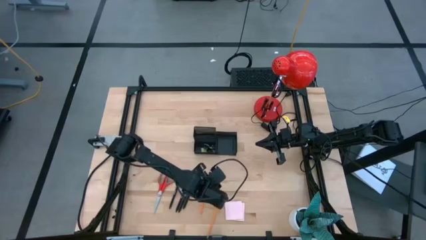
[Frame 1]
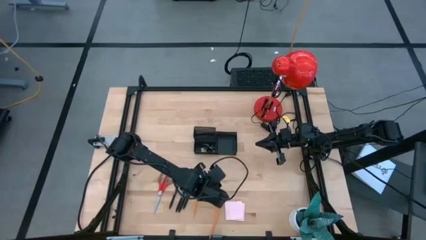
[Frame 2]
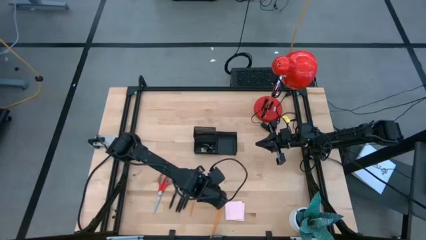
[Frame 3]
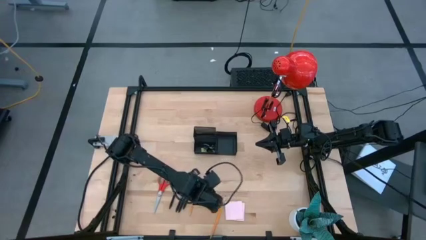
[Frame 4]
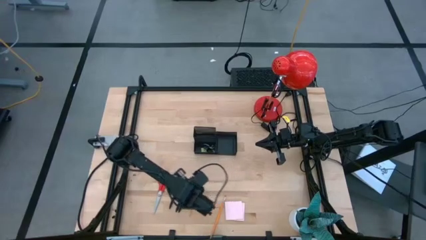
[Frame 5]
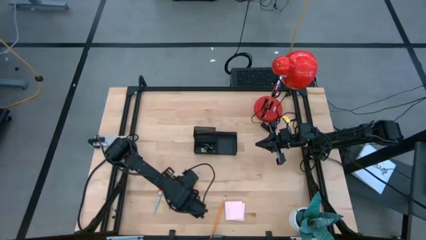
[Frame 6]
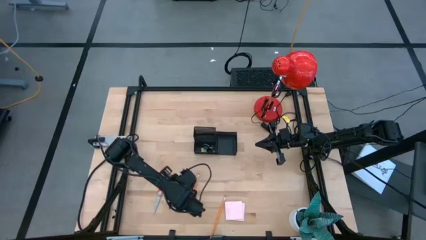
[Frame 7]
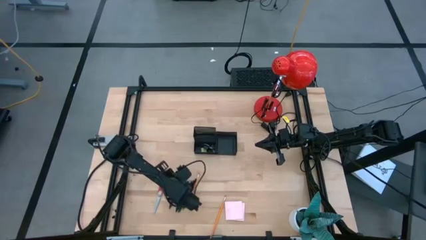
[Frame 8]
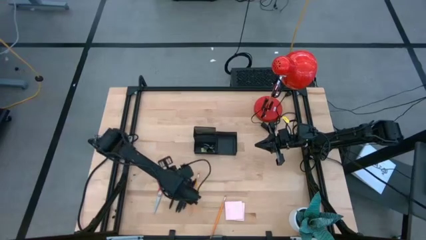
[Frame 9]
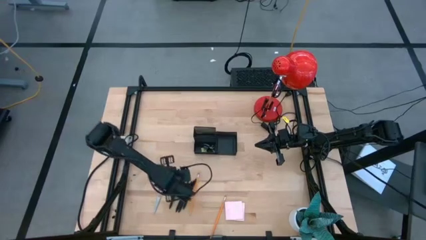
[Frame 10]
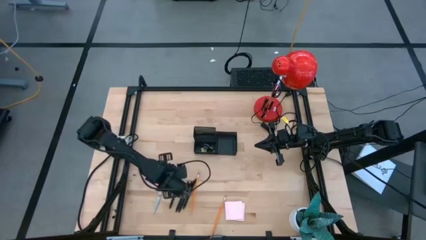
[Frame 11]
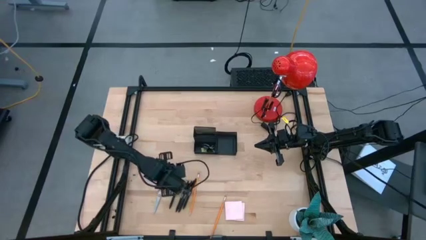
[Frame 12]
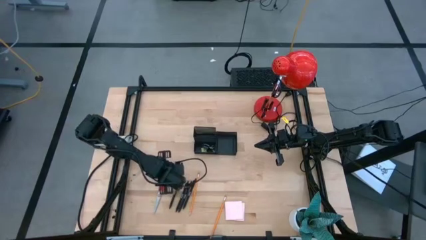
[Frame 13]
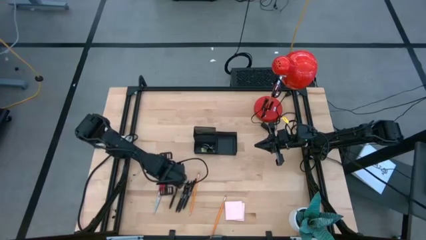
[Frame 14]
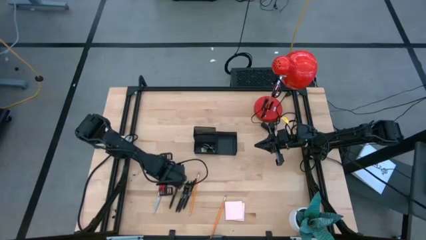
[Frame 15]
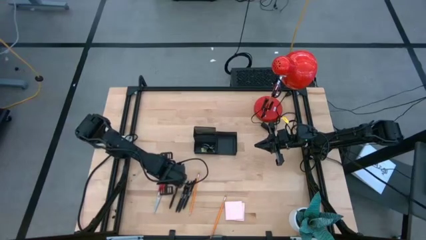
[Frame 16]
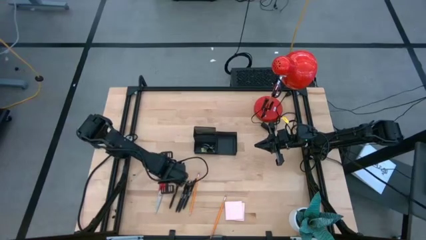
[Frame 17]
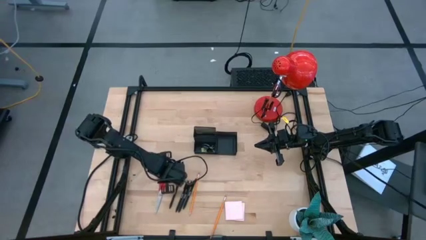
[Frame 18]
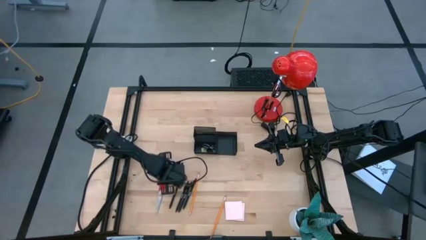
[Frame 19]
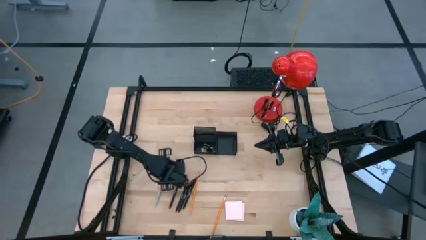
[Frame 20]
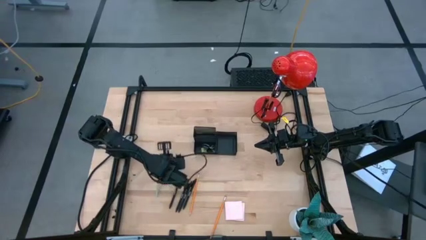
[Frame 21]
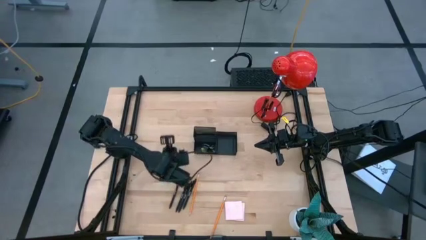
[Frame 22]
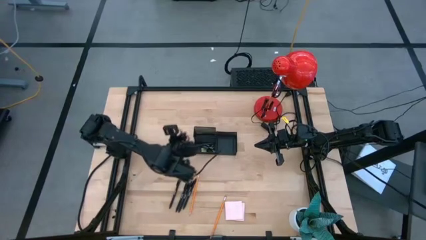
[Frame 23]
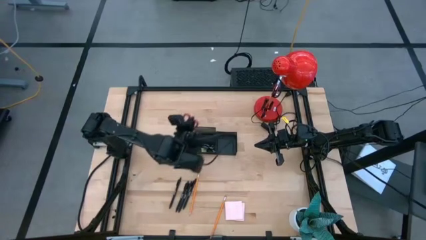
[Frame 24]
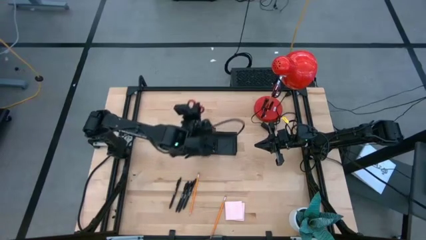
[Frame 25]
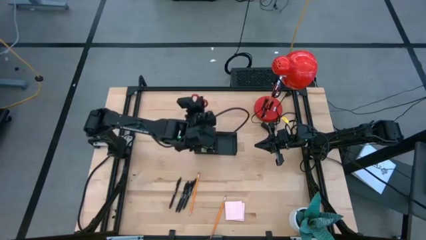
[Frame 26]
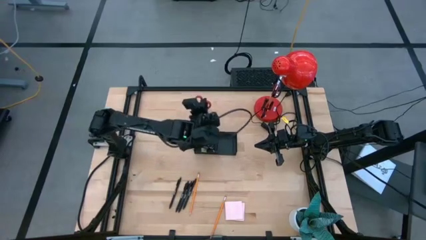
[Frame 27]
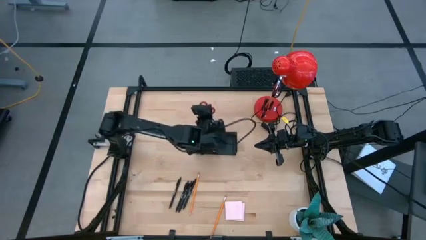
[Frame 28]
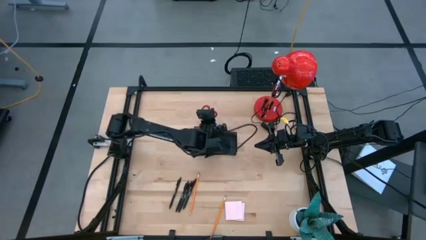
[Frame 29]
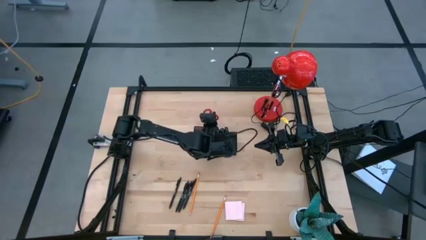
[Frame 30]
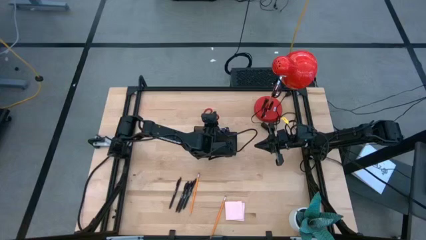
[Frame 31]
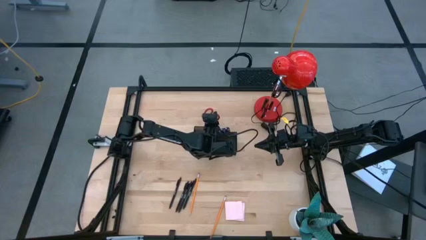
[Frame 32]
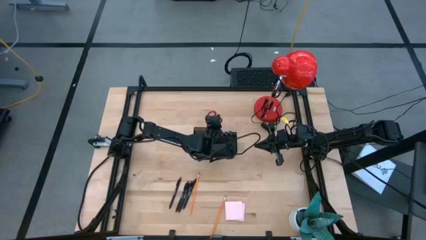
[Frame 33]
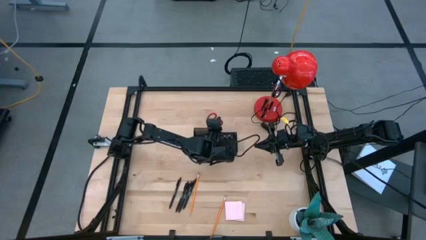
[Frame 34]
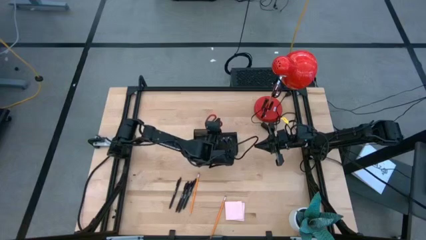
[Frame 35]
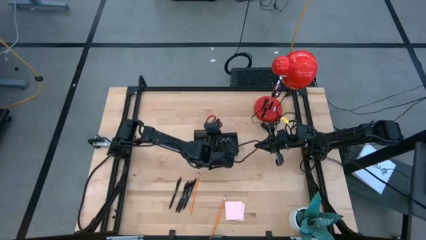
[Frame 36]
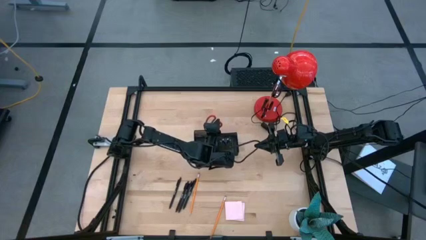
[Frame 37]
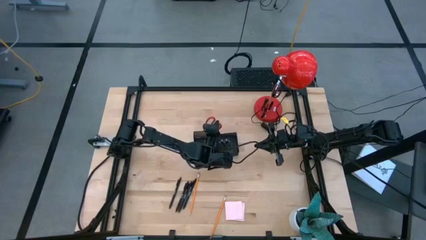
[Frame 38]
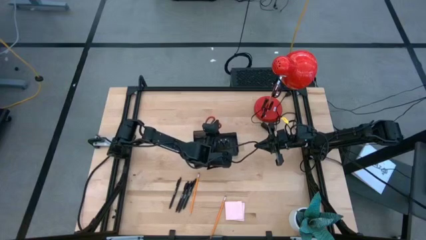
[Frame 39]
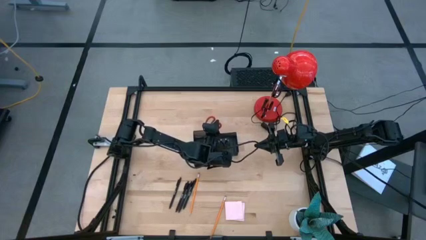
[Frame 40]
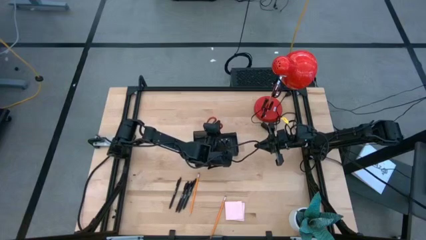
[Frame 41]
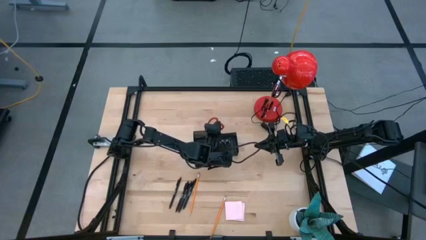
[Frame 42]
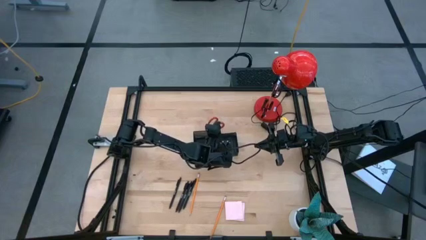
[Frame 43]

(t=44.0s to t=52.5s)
Task: Pick and place office supplies into organizer
Put the scissors into the desk organizer

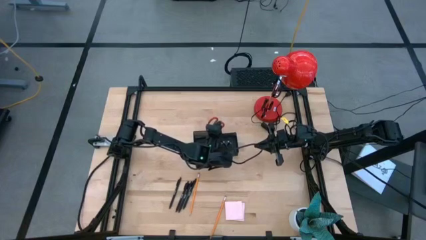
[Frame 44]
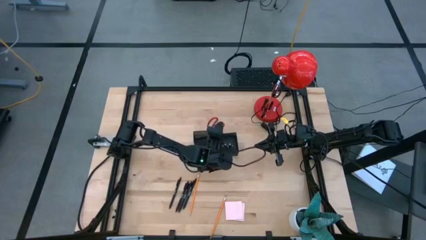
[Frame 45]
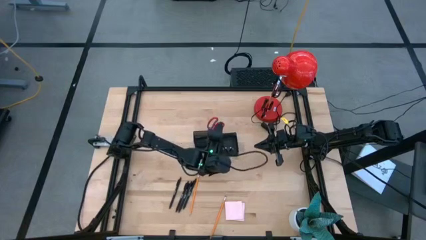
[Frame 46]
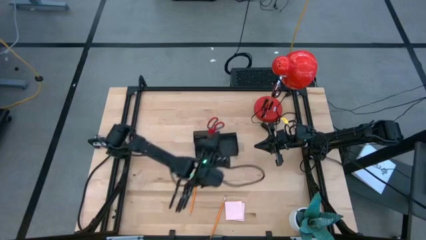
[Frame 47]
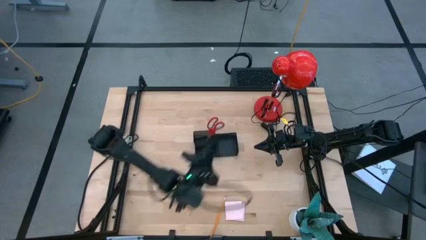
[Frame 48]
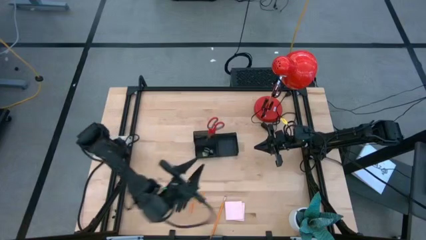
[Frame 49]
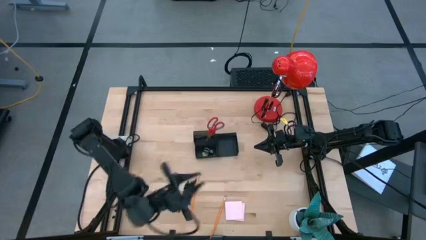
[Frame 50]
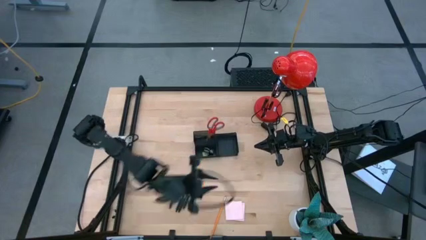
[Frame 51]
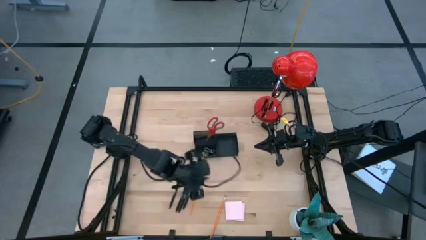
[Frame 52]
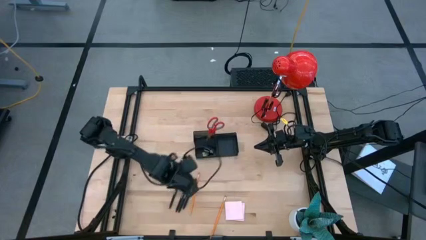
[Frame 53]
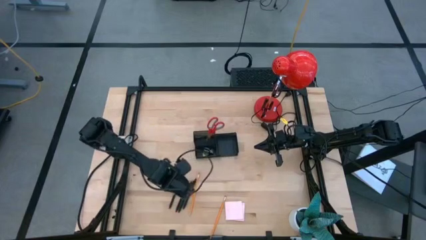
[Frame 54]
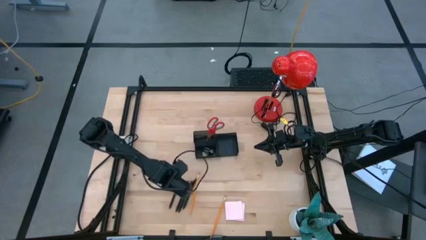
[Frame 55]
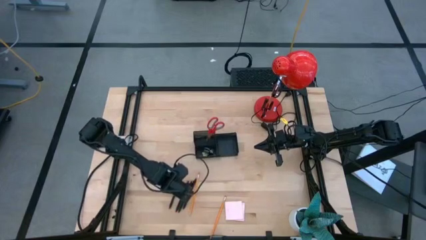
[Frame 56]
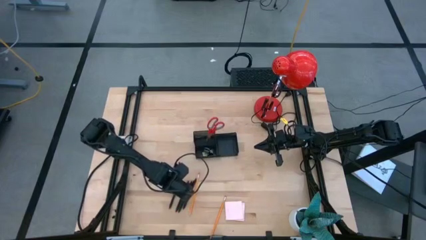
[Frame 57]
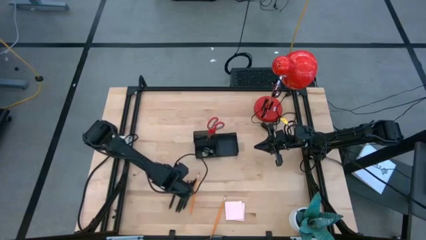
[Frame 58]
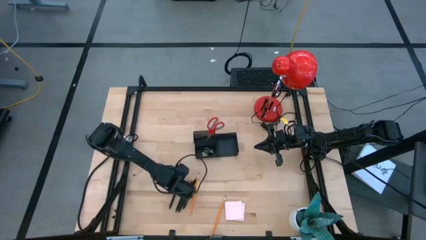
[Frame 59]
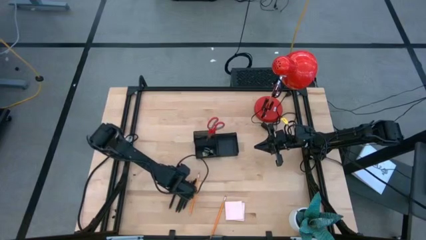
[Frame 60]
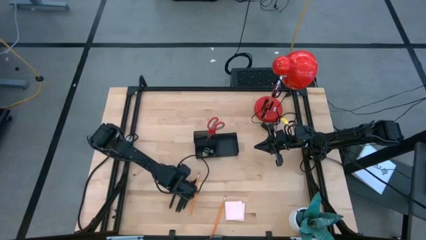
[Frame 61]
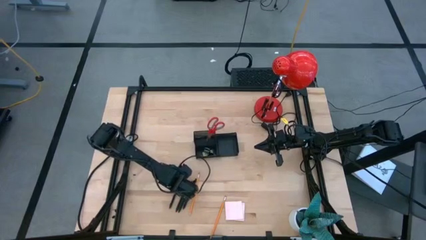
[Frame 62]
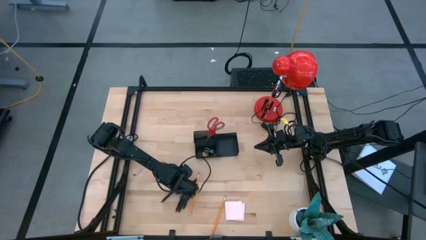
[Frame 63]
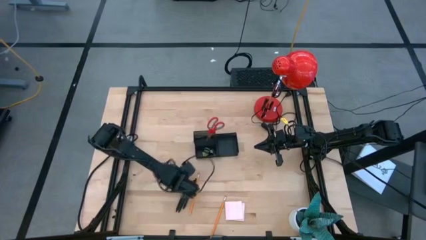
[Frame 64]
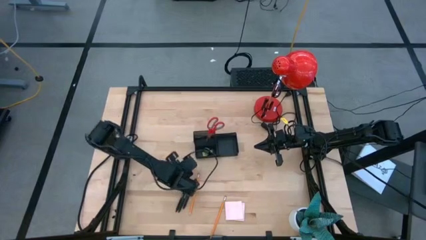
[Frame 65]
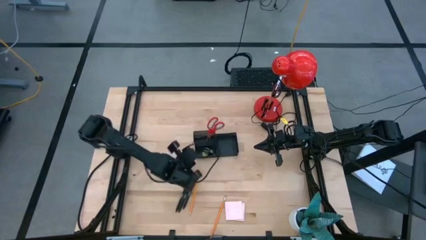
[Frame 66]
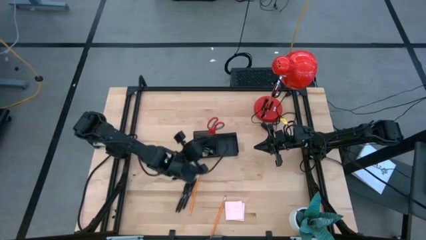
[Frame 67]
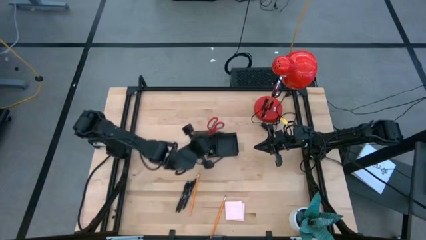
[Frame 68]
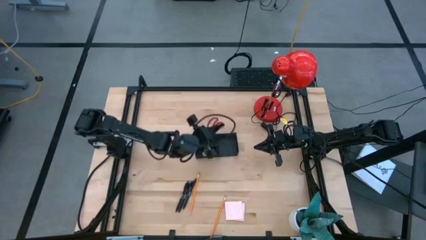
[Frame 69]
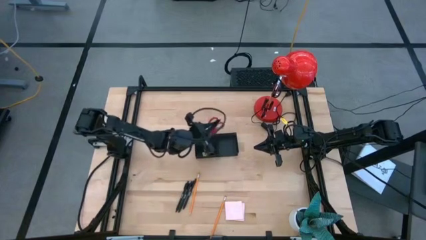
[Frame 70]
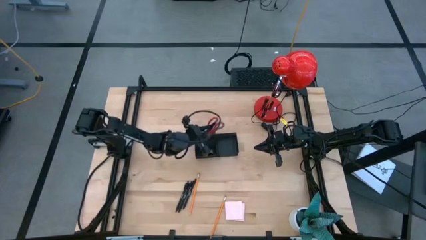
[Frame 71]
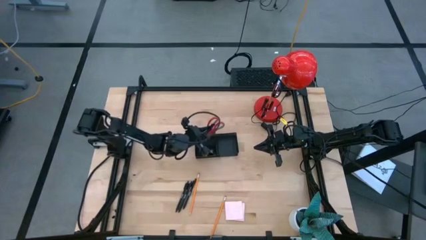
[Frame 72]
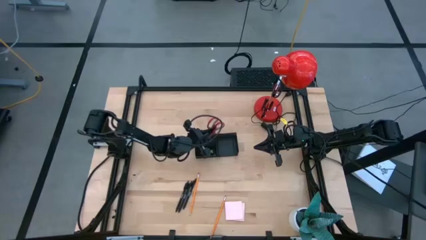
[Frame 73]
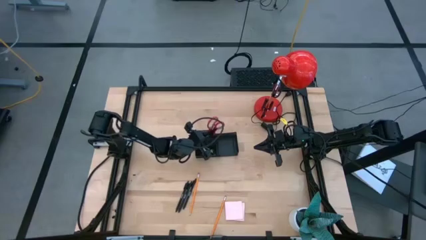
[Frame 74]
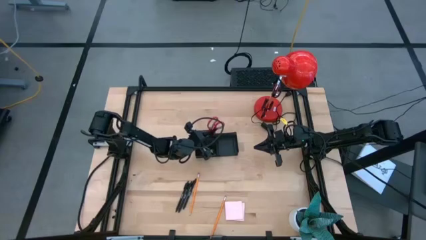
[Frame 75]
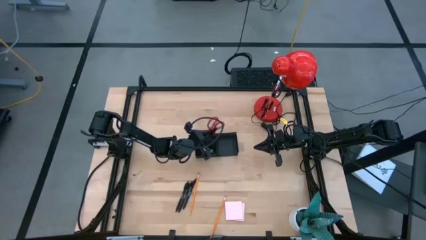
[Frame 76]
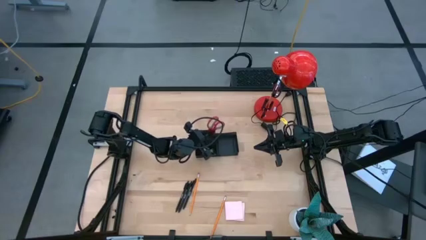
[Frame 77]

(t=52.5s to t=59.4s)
Put the pen into the desk organizer
